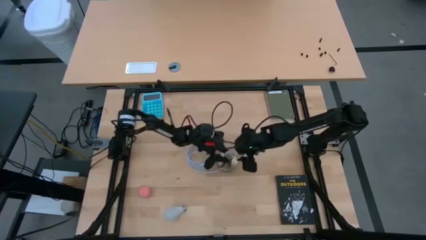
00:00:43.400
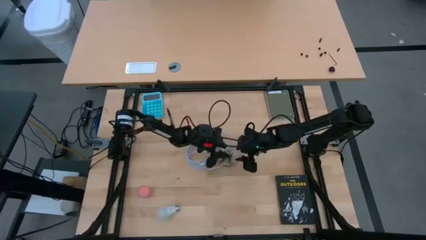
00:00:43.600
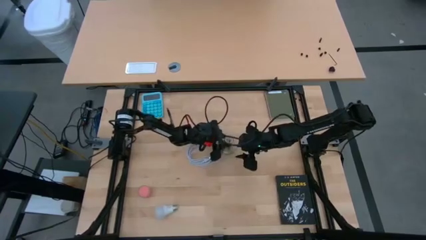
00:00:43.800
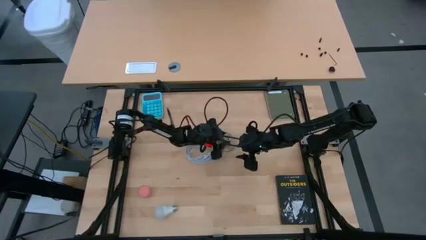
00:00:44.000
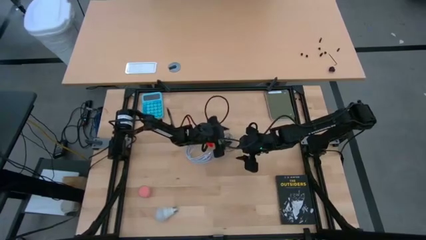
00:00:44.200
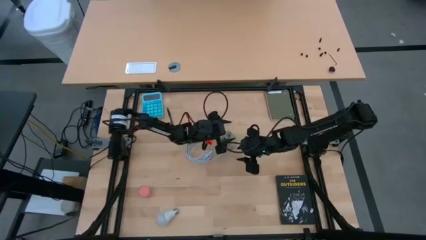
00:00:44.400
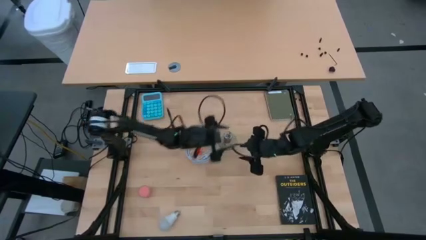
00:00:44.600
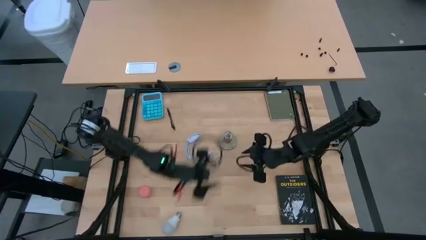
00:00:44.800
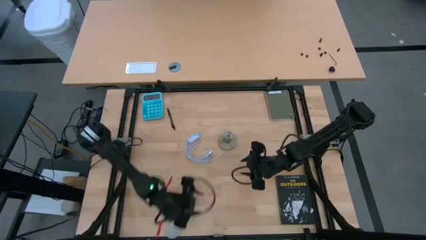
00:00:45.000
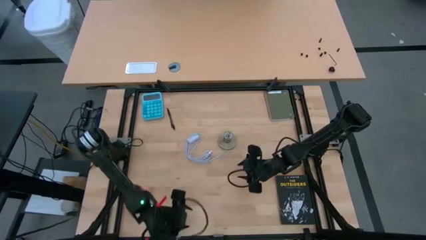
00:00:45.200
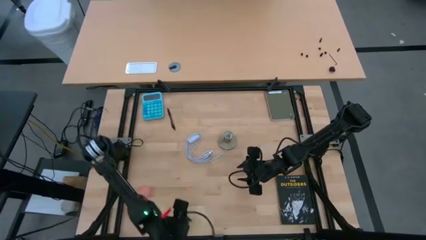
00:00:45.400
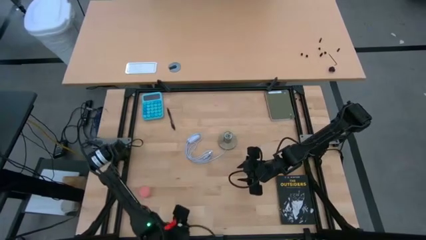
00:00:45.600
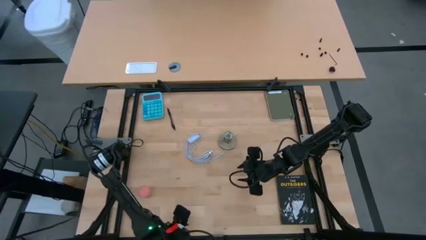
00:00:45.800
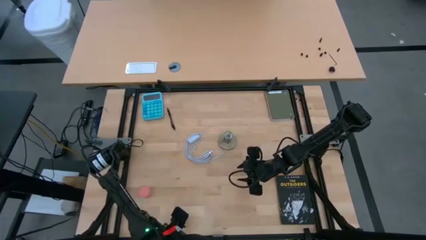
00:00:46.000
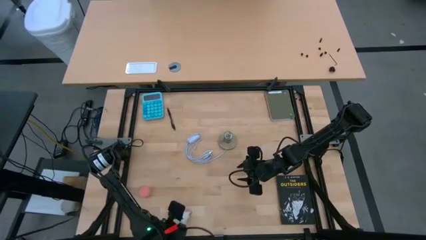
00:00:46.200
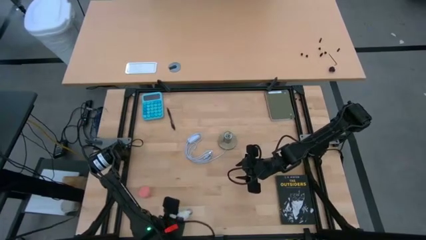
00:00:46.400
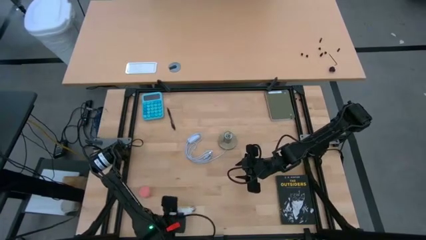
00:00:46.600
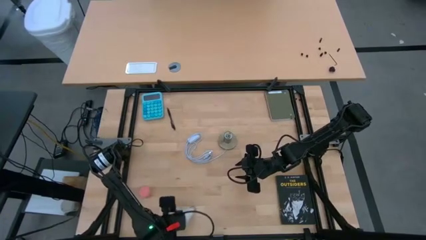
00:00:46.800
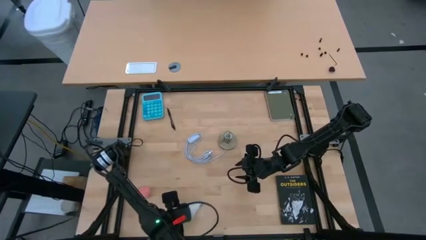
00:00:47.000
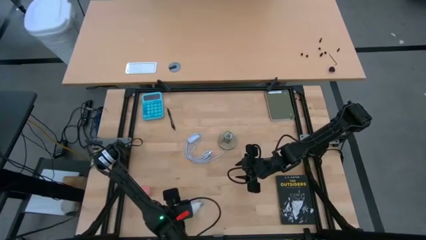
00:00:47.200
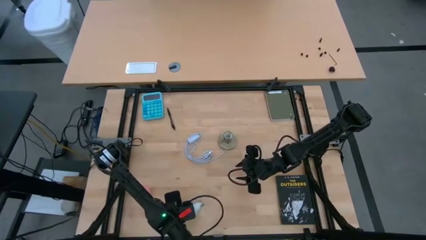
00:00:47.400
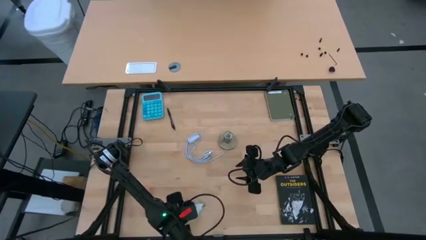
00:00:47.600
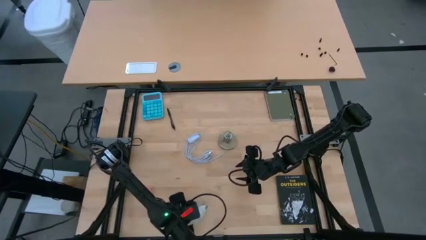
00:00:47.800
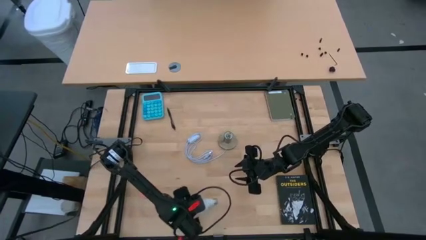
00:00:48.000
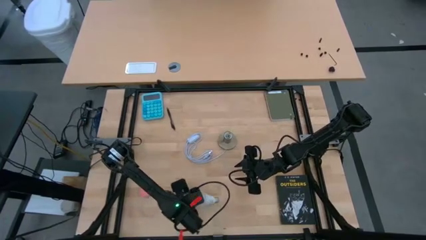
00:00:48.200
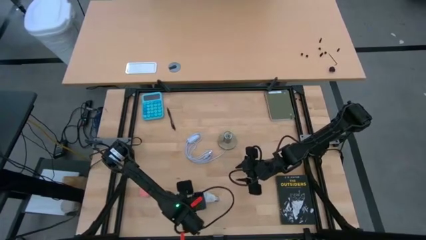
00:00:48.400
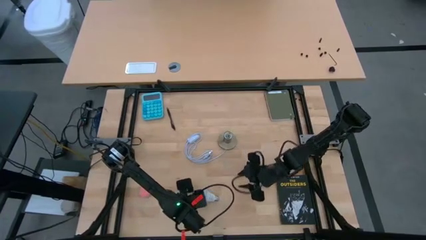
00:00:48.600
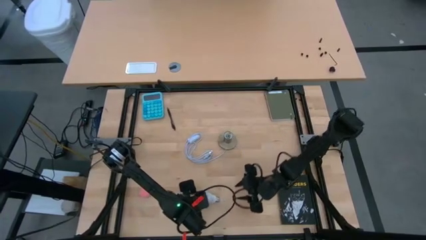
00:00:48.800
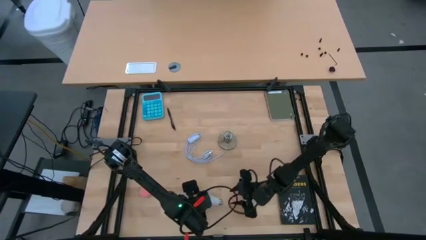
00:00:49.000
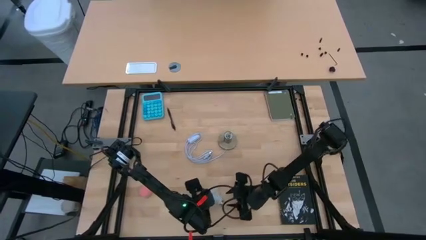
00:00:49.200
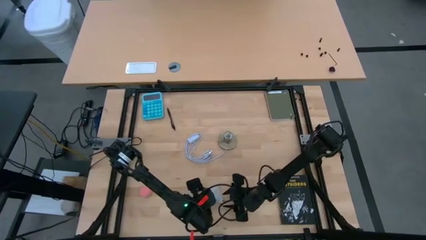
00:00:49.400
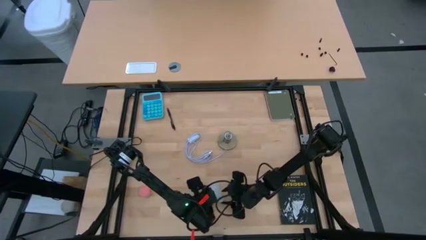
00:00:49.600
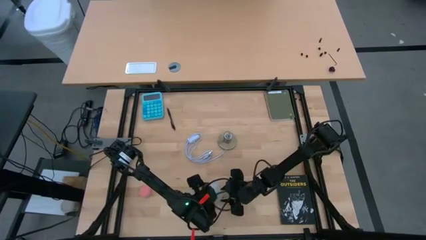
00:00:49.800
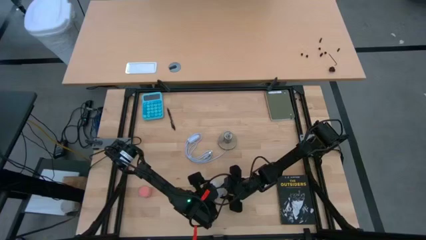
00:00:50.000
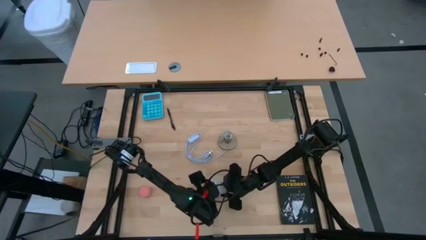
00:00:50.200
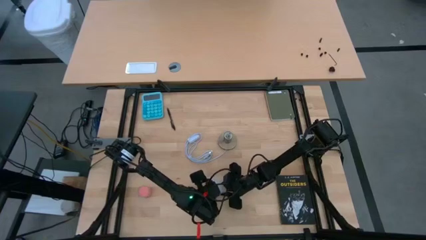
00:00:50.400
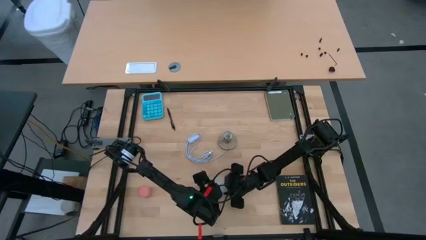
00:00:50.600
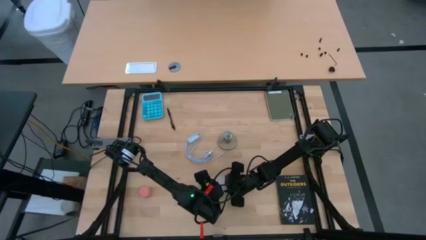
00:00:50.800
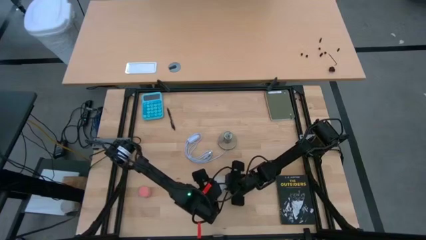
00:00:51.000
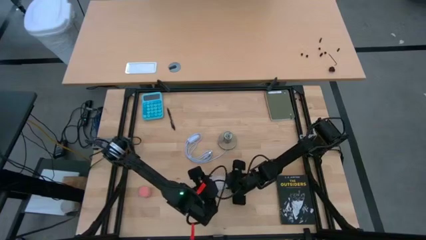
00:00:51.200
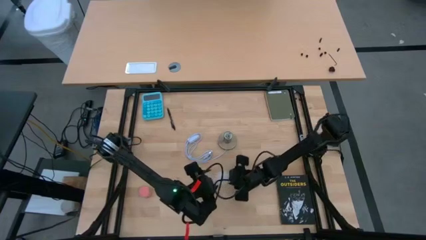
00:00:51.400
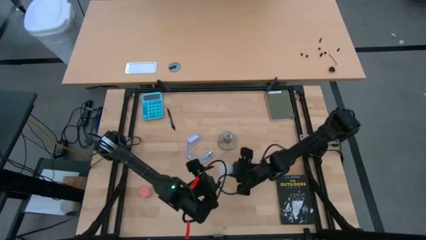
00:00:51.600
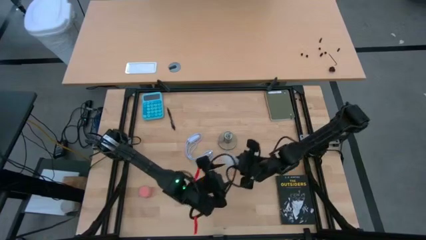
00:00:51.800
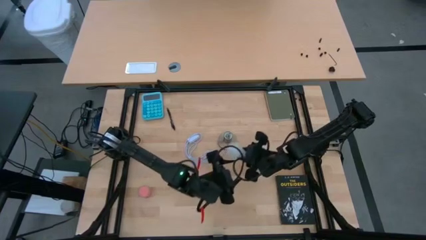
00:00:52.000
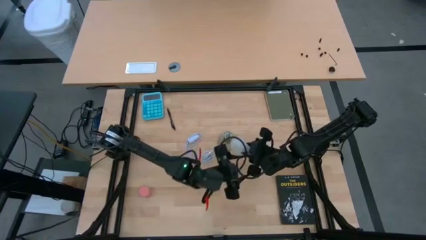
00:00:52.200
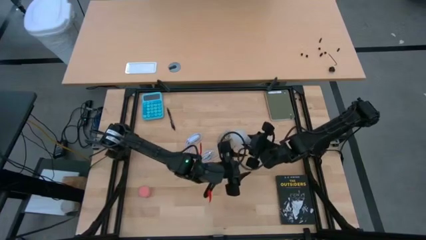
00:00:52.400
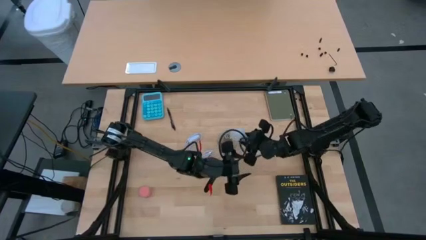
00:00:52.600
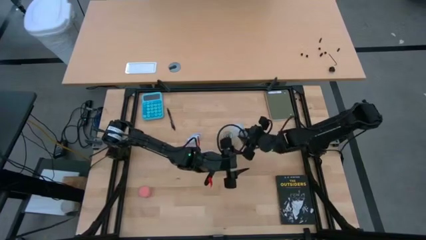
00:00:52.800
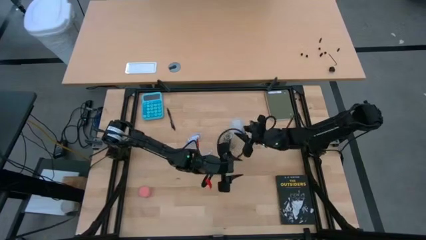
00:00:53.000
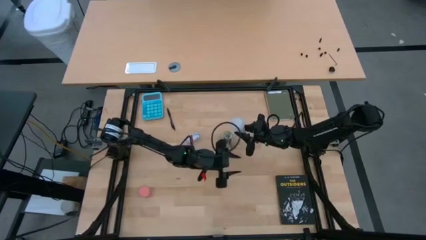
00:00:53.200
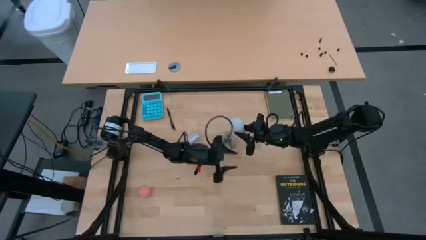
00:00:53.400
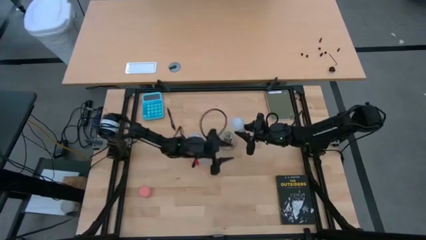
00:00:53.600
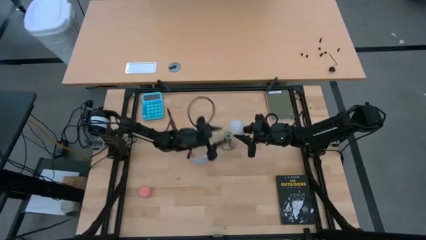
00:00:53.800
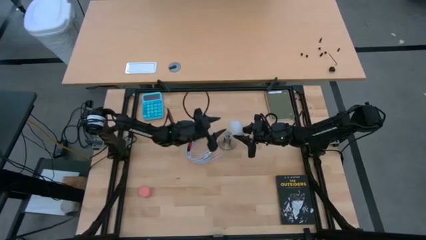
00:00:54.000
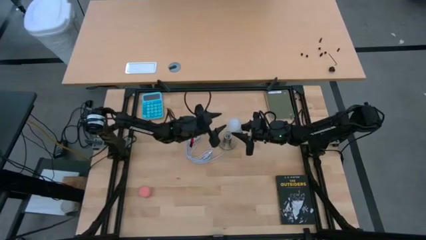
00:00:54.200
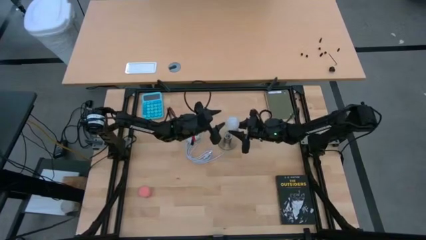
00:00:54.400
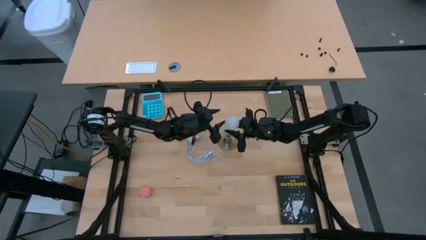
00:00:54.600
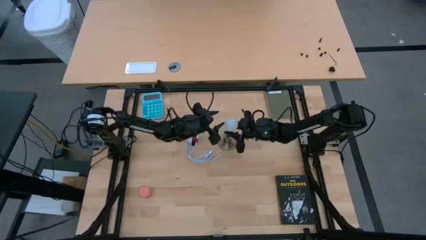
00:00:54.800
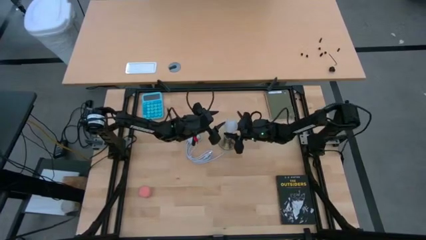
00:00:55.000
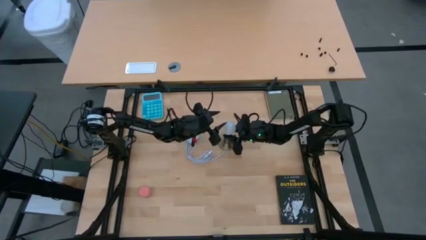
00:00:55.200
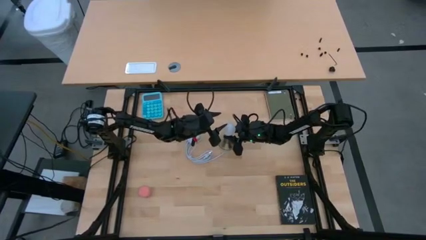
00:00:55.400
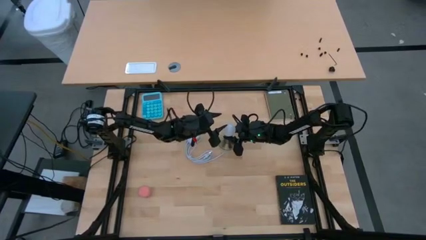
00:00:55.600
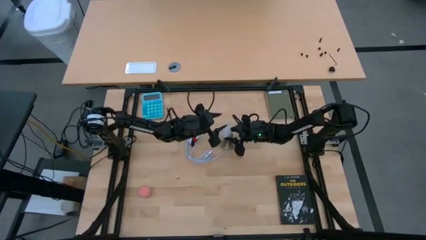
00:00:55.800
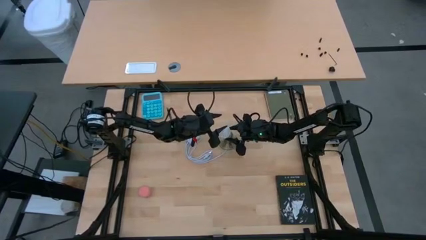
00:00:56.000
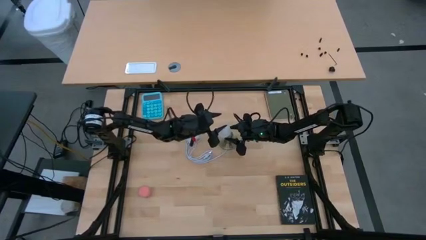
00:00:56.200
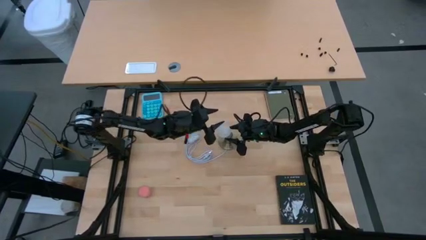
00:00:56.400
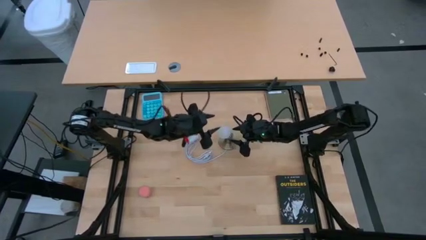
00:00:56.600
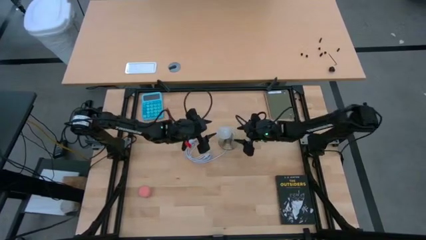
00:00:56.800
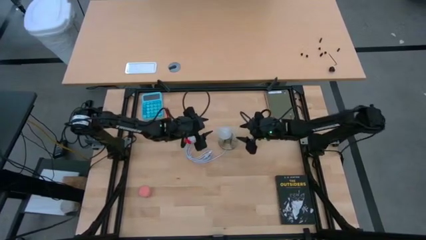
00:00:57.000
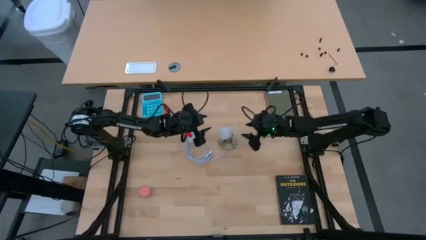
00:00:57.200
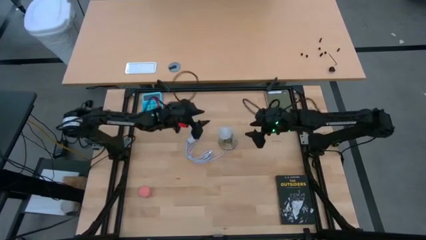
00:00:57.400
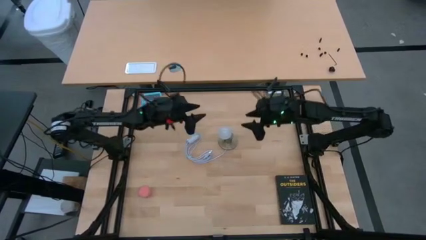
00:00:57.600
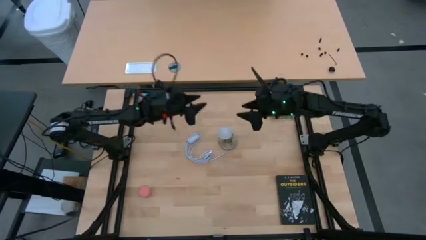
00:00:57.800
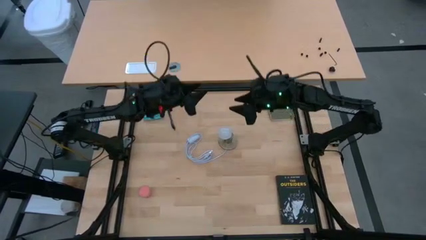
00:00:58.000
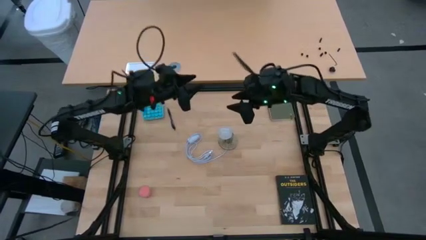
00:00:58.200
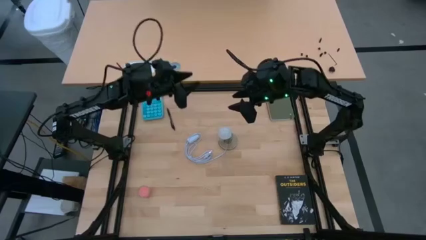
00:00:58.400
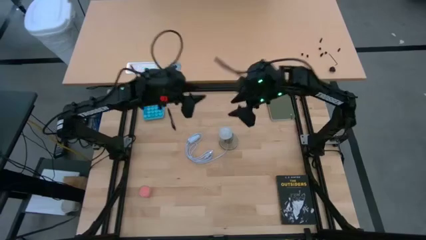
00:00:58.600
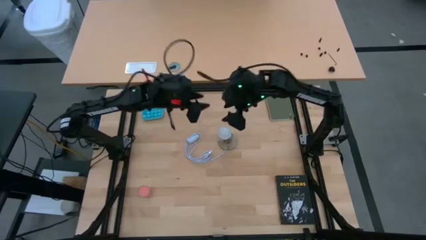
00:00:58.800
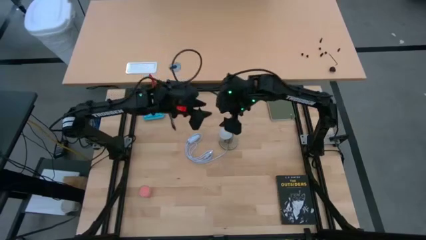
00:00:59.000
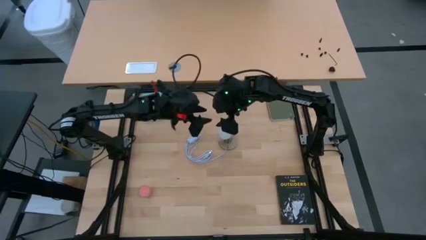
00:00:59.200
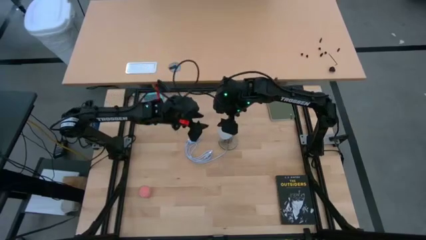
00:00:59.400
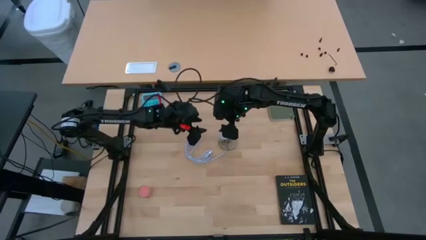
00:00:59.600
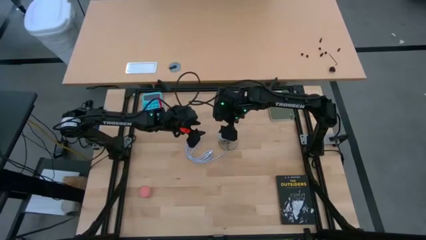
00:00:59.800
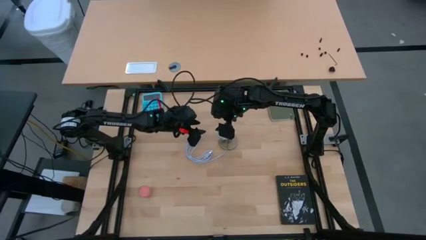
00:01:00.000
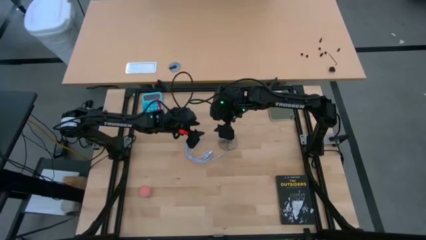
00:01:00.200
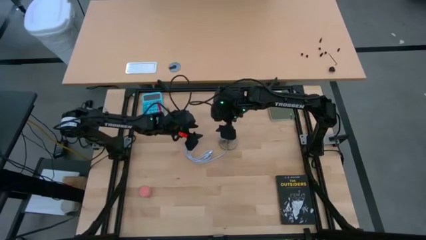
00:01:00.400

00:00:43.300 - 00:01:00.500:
Task: Screw lightbulb
Insert the white lightbulb into the desk lamp

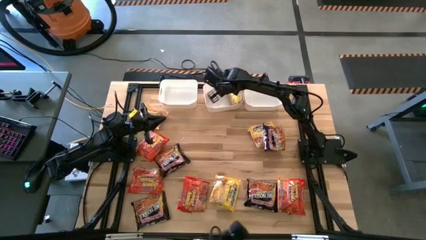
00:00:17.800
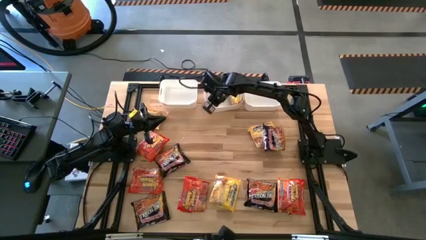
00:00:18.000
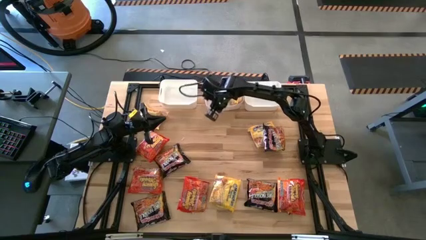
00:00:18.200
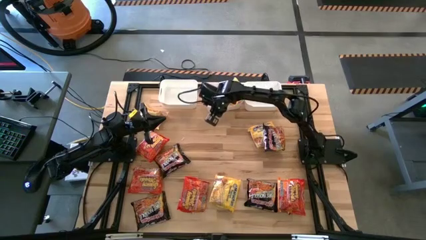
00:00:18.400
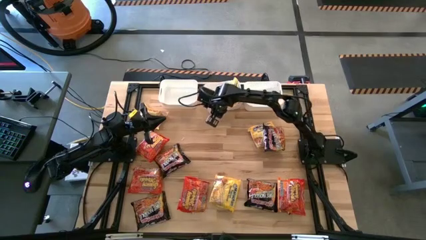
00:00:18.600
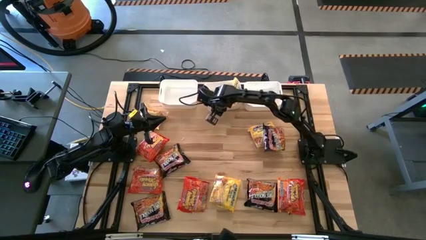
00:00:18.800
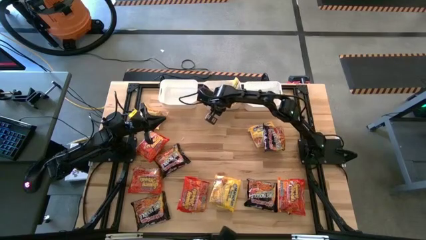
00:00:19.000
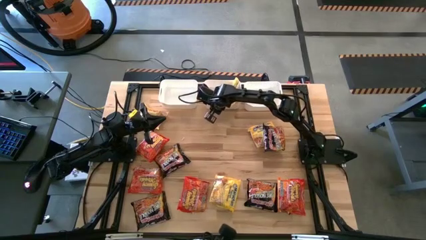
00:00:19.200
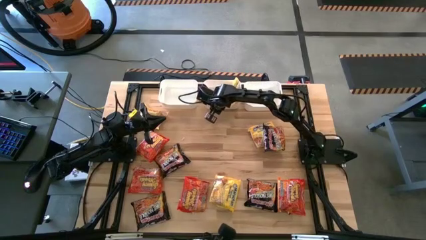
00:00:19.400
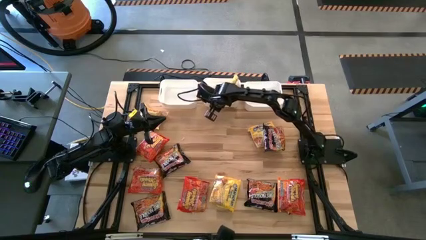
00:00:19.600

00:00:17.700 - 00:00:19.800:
Task: Sort Maruchan noodles
Adjust the center white bin
